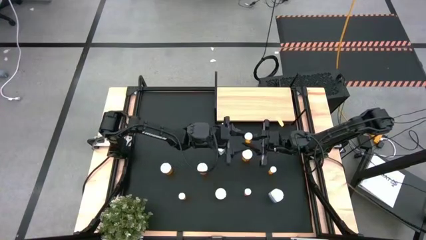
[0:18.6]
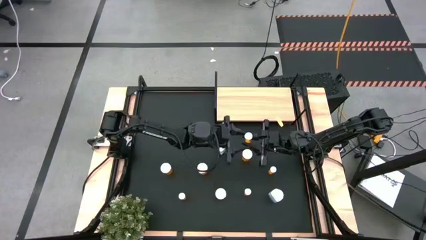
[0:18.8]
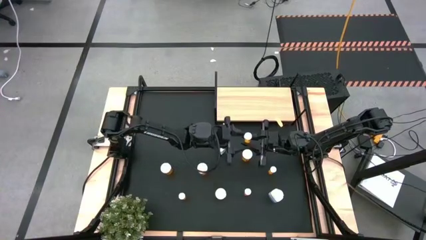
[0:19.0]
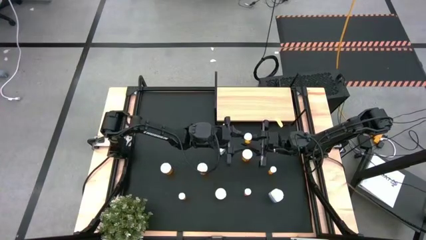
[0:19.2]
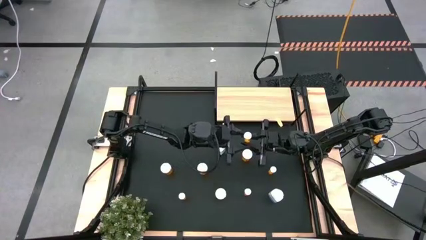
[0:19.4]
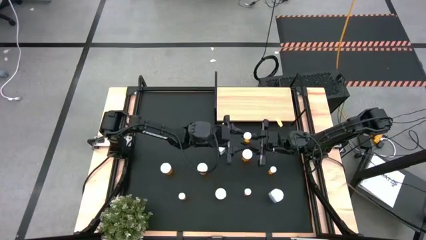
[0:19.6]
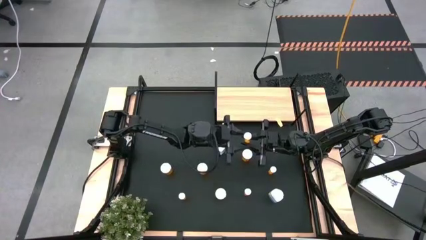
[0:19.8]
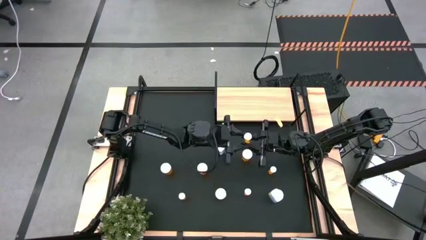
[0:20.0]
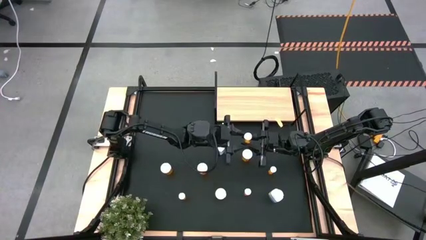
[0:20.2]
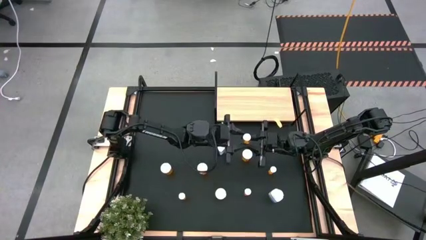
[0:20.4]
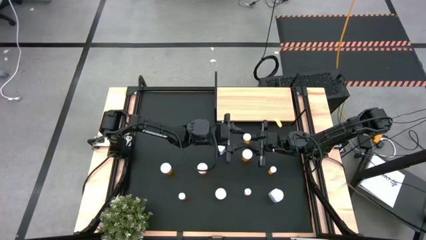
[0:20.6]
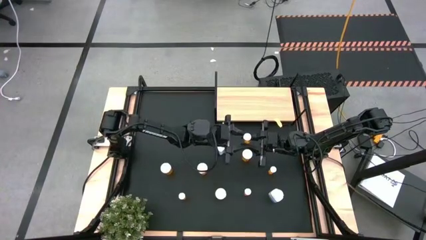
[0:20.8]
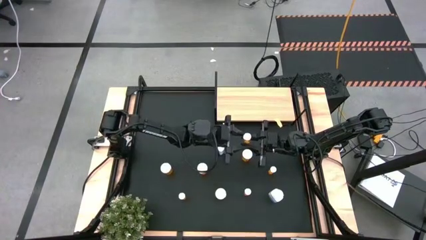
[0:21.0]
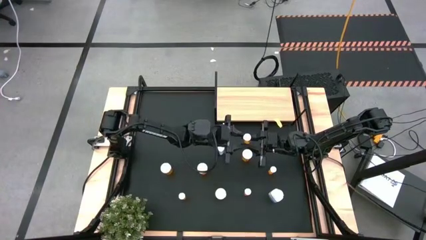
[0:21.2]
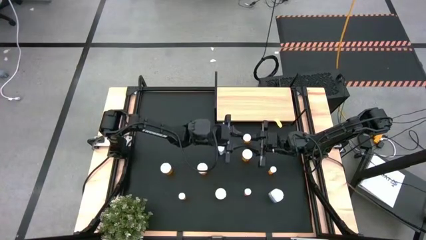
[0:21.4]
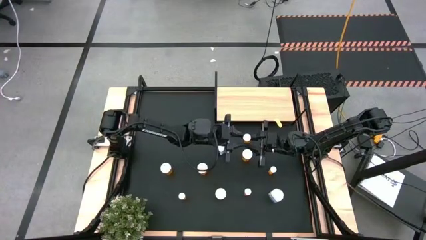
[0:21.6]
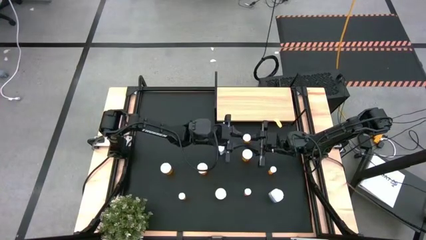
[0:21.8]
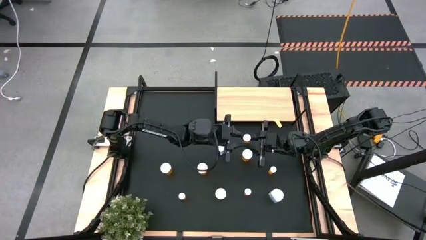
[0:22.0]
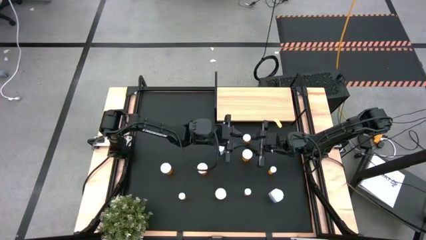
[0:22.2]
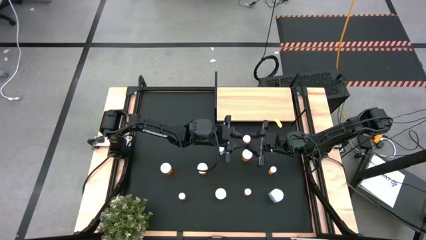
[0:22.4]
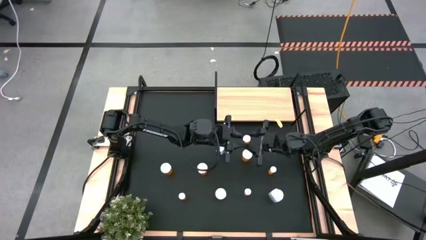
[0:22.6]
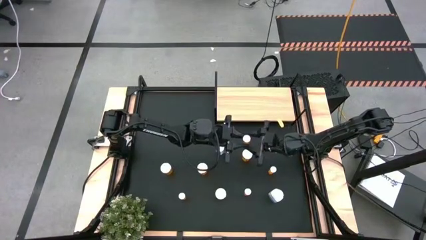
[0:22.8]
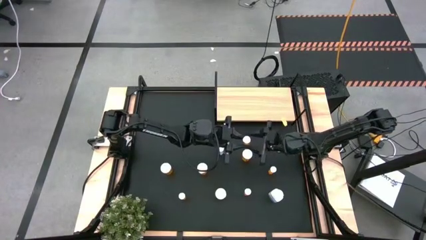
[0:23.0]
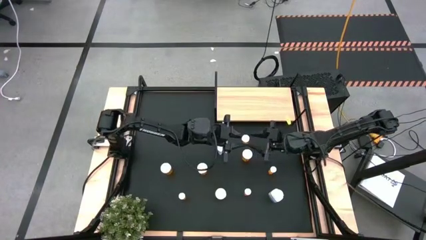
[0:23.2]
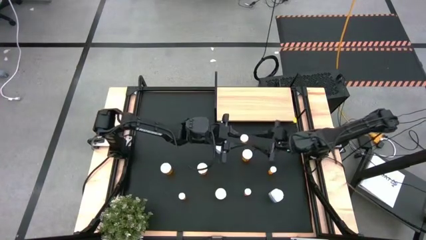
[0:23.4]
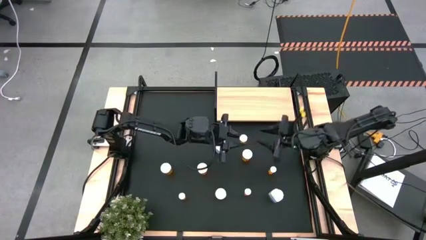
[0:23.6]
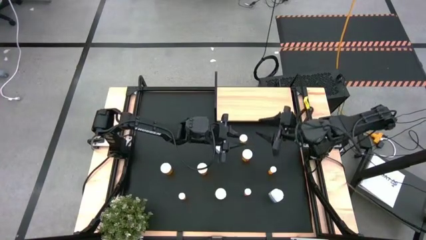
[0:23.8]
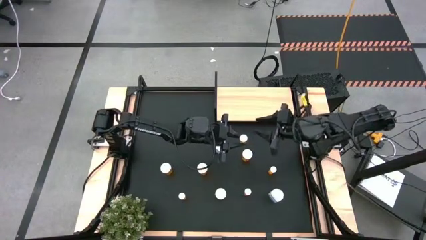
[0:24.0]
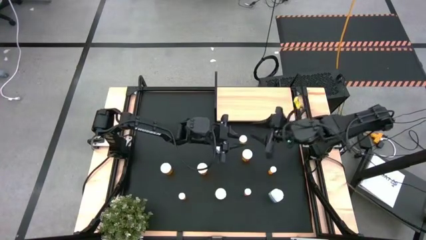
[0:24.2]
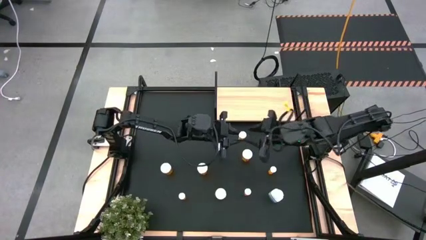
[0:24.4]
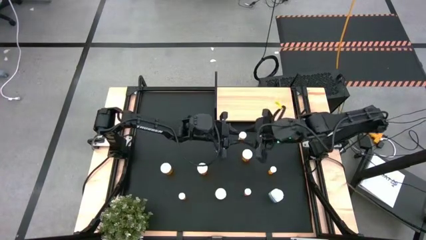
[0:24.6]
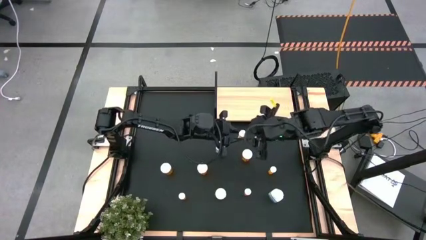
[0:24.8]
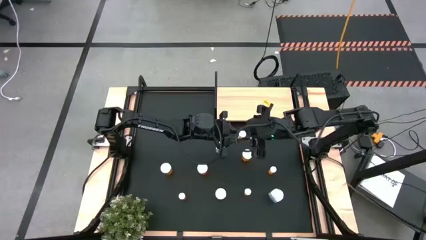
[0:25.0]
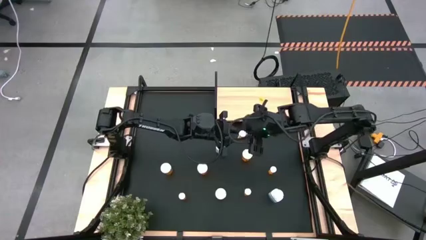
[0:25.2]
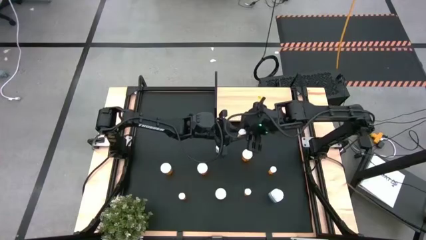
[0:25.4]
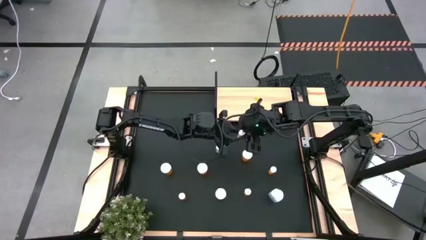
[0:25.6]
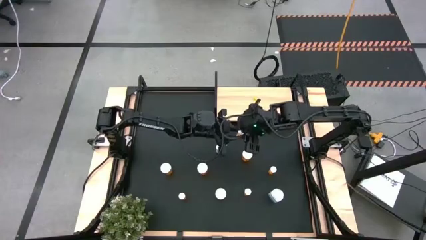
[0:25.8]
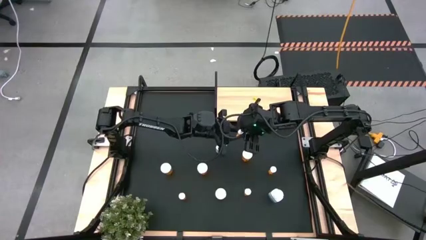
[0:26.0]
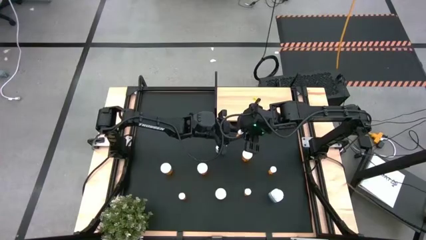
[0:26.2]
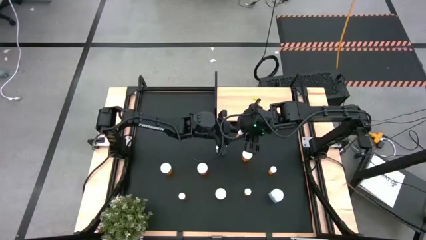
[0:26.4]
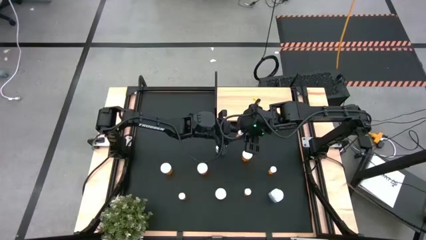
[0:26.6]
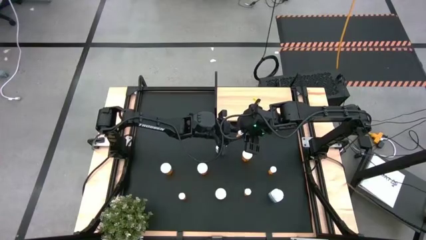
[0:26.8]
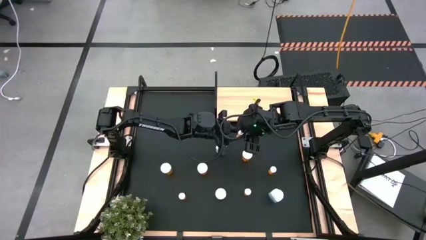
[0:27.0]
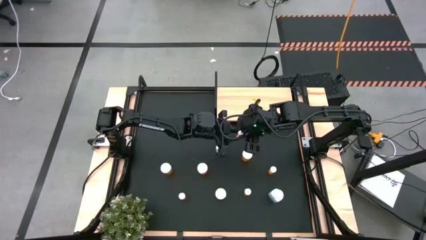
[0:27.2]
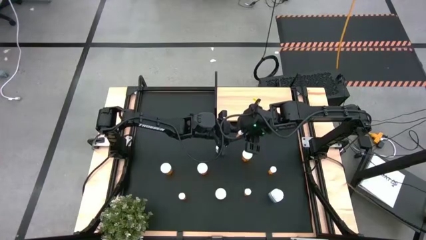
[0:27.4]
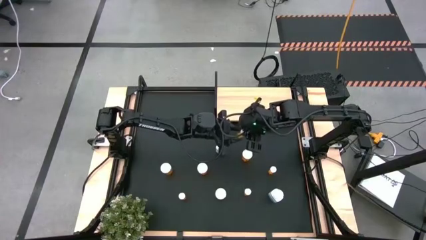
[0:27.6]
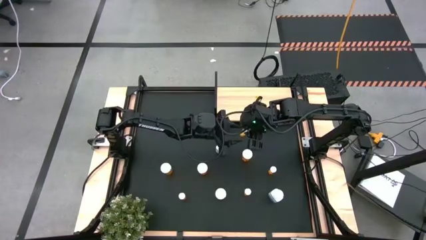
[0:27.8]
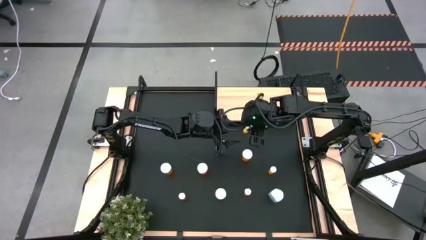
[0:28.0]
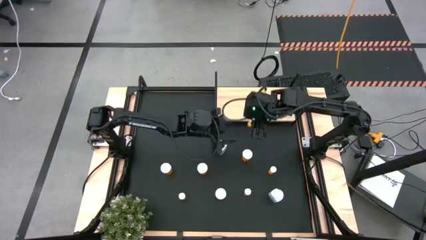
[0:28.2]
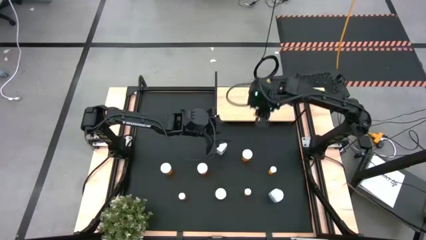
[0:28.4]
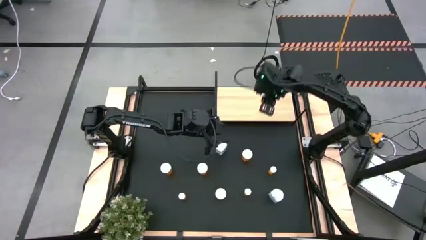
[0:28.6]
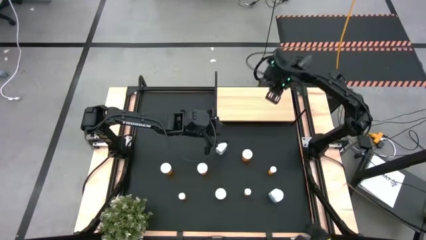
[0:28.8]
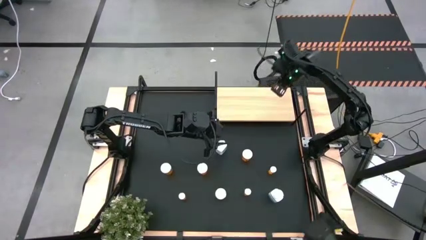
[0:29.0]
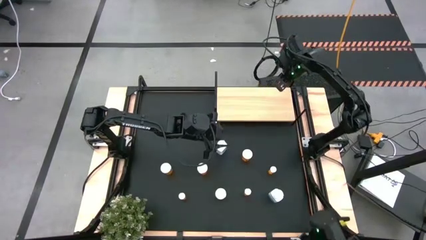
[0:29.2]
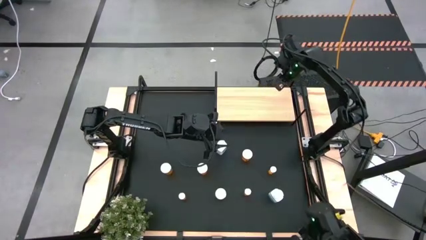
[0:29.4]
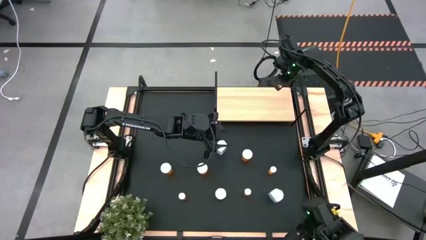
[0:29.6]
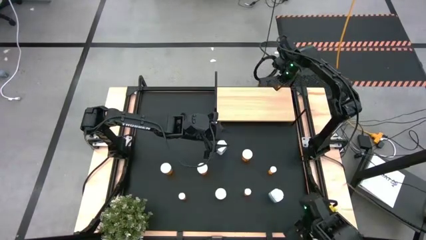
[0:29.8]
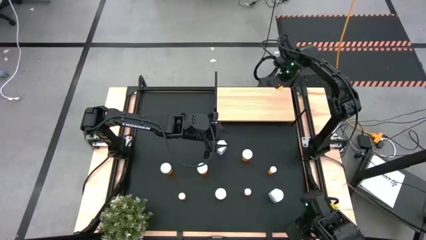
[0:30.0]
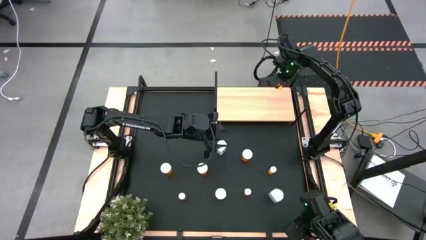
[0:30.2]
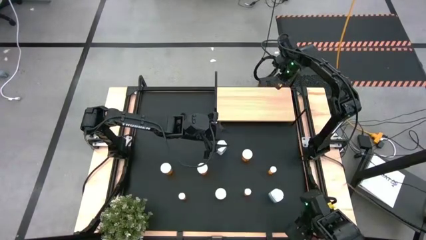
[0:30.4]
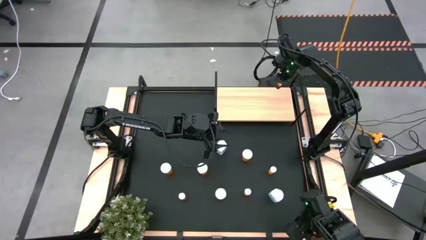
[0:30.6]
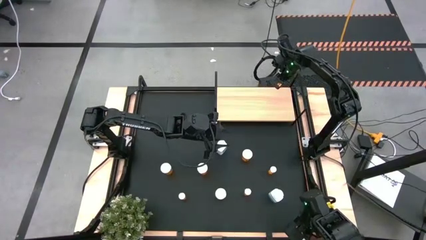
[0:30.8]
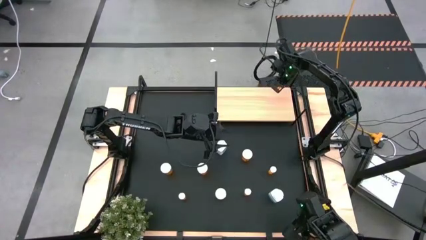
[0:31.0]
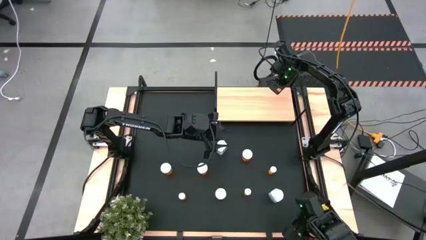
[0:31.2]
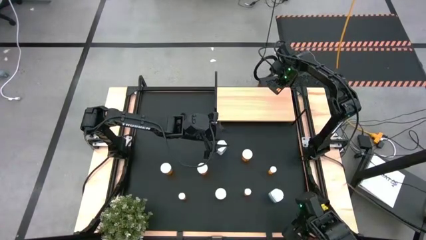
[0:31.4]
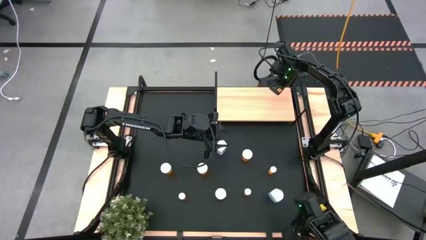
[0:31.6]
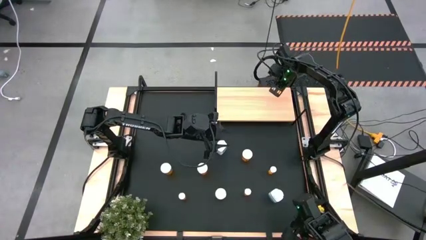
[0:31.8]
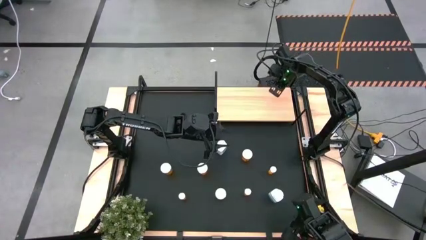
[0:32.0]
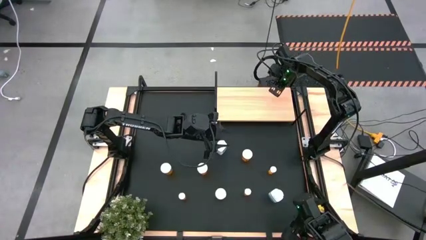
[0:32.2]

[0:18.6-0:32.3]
Task: Pick and place medicine bottles onto shelf by color
Put the small orange pill bottle on the shelf
